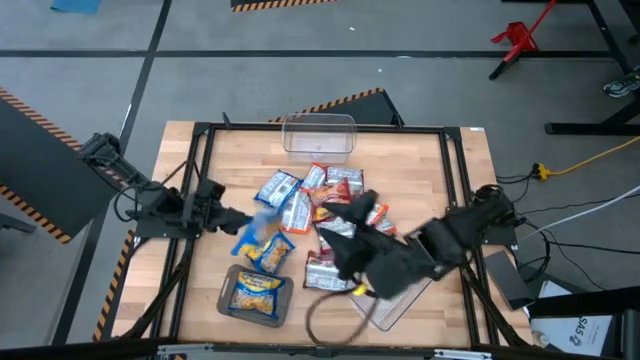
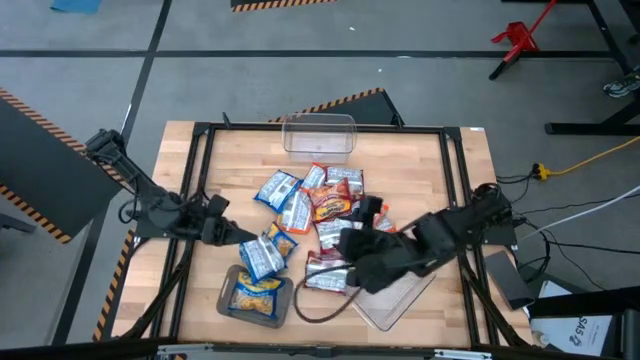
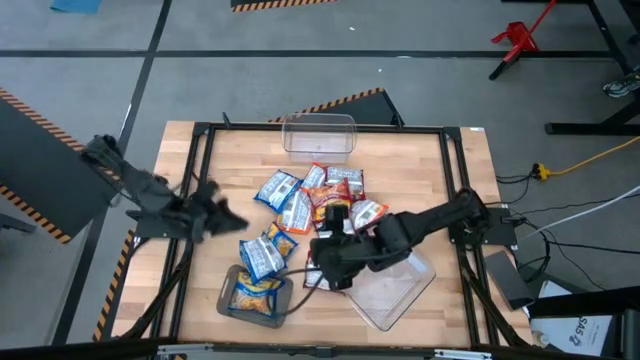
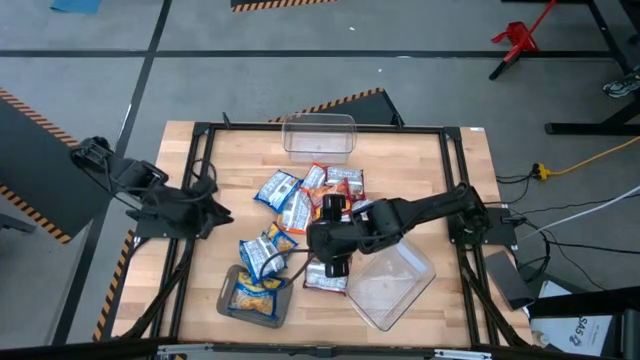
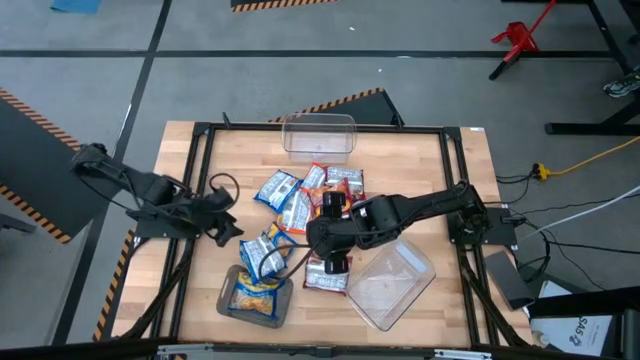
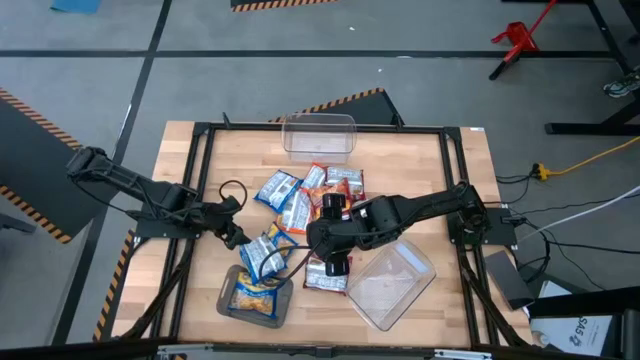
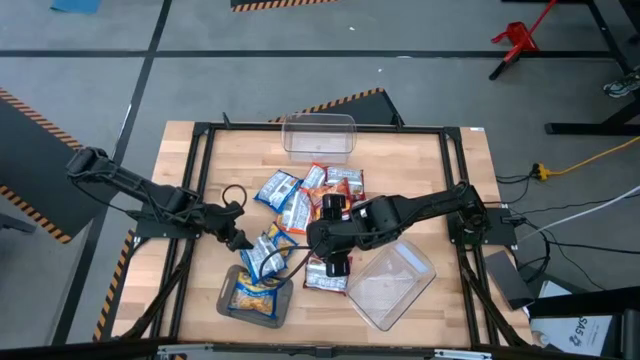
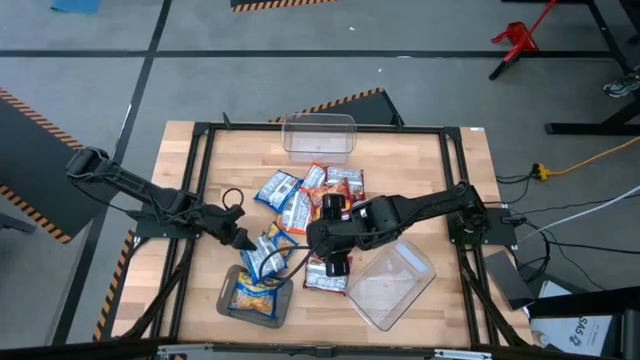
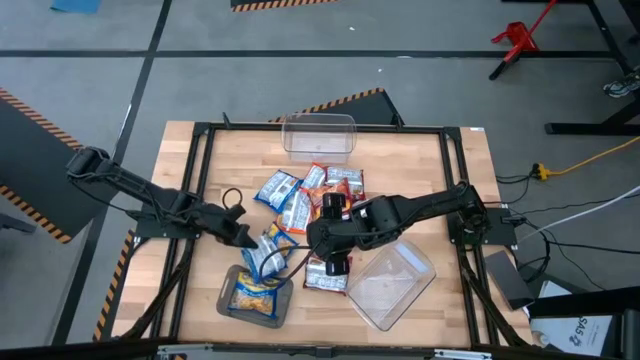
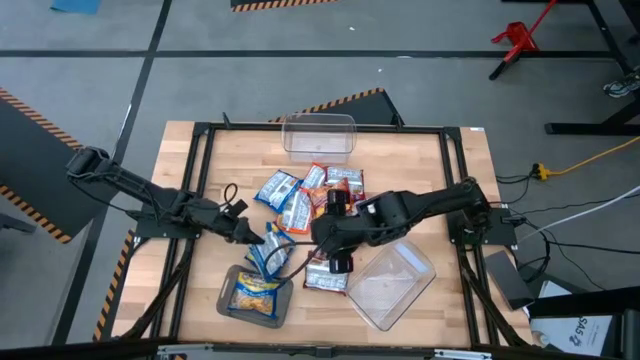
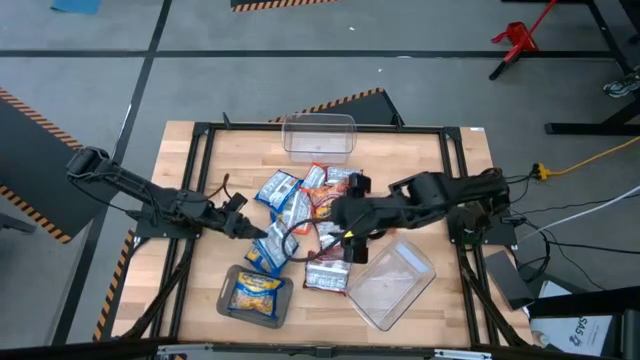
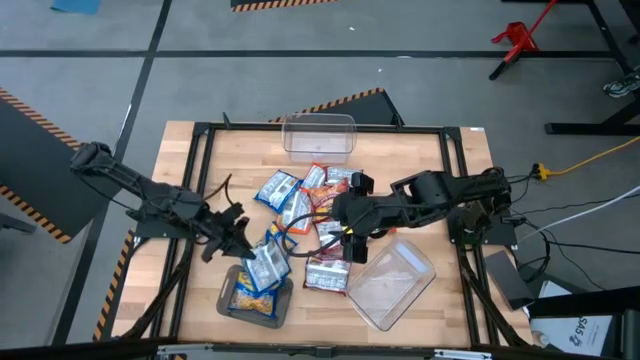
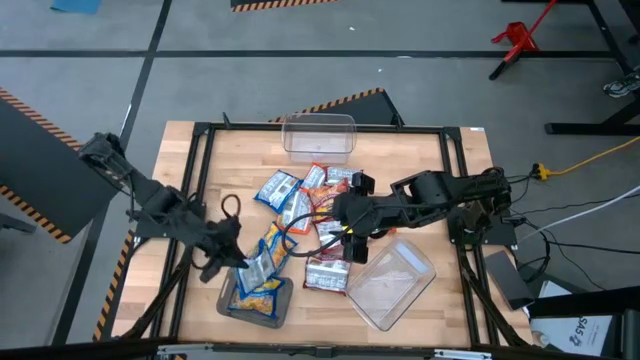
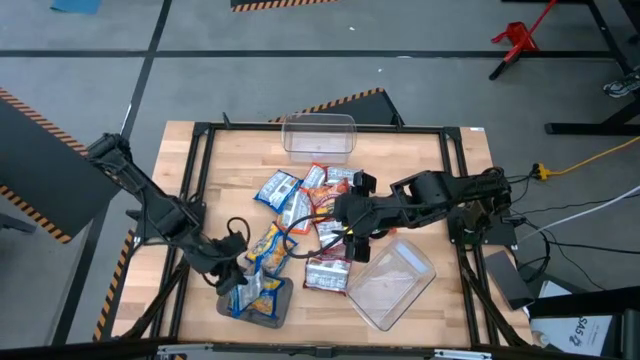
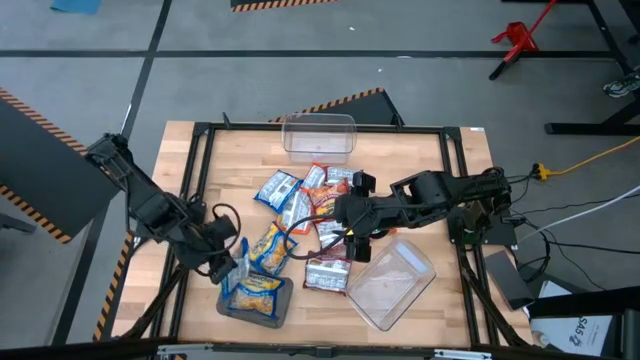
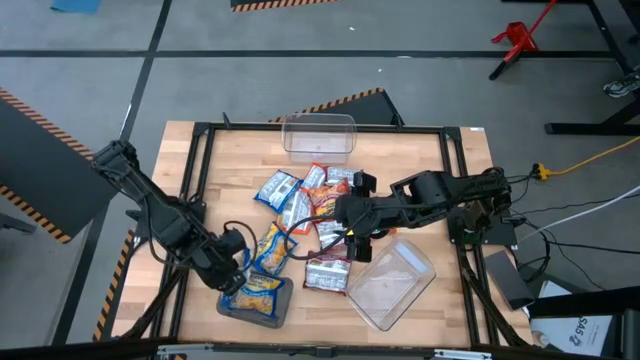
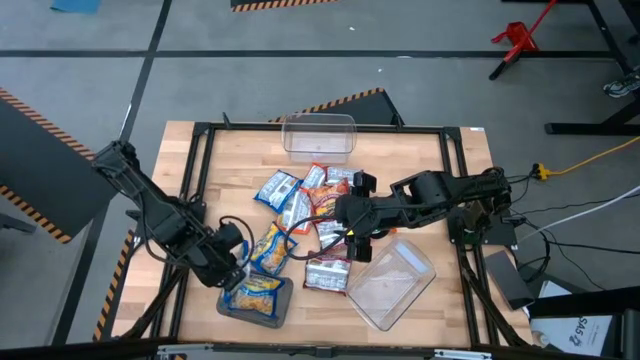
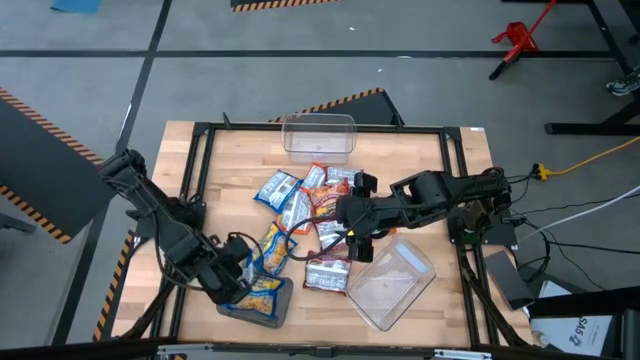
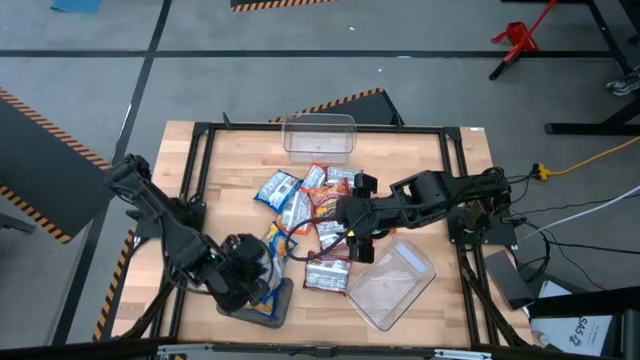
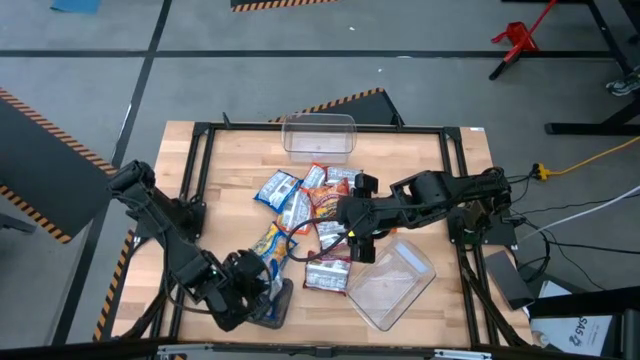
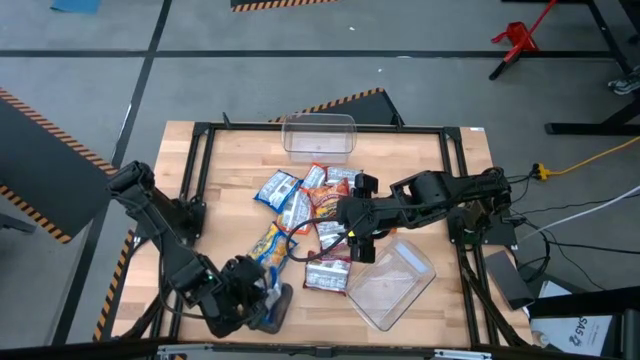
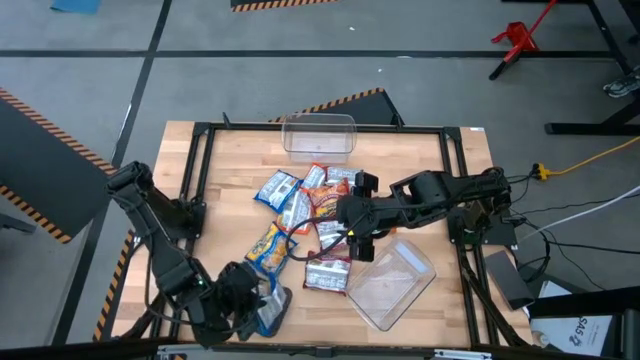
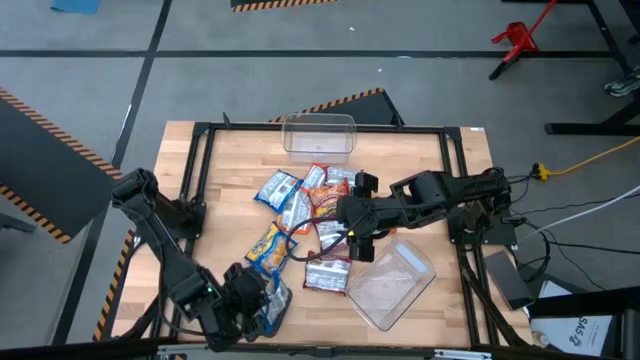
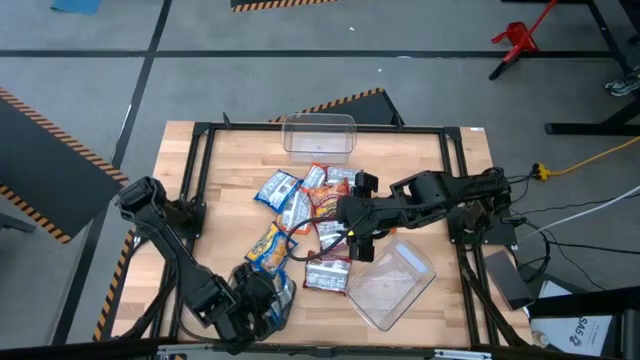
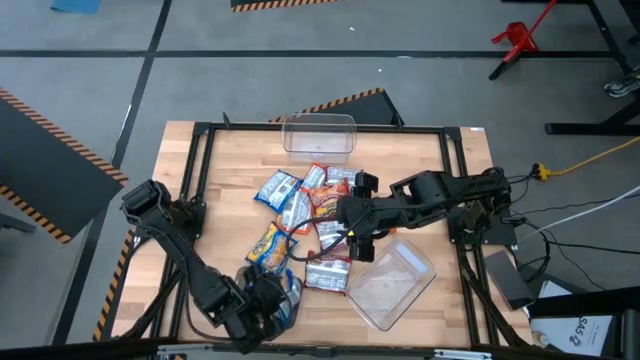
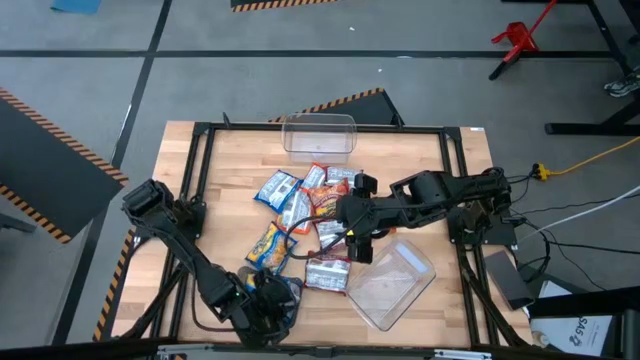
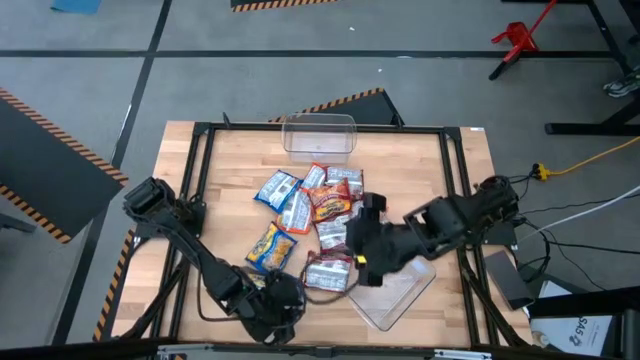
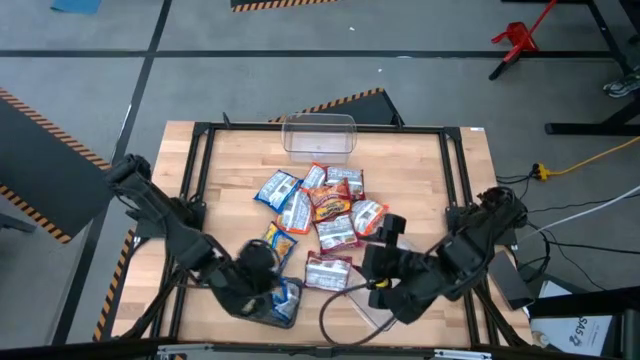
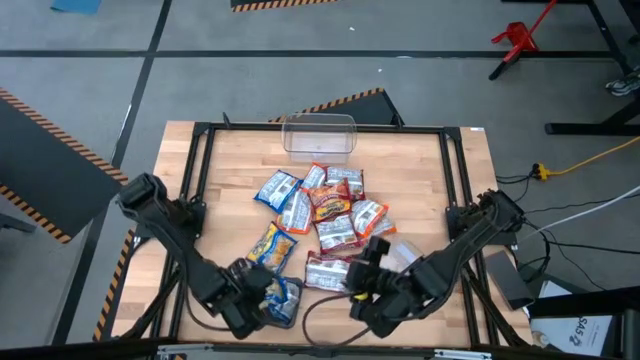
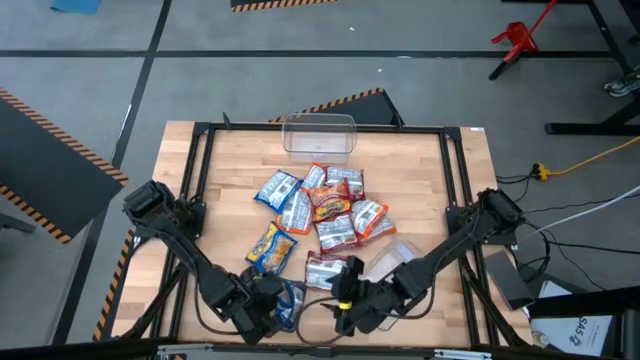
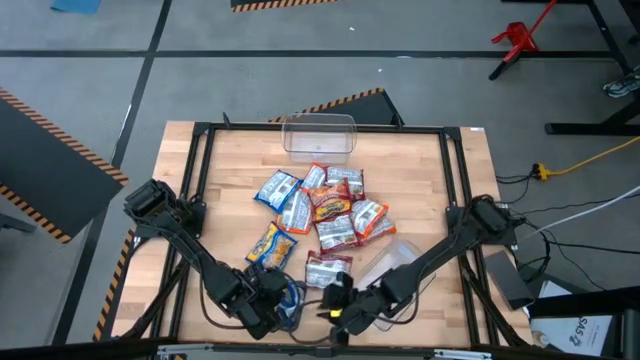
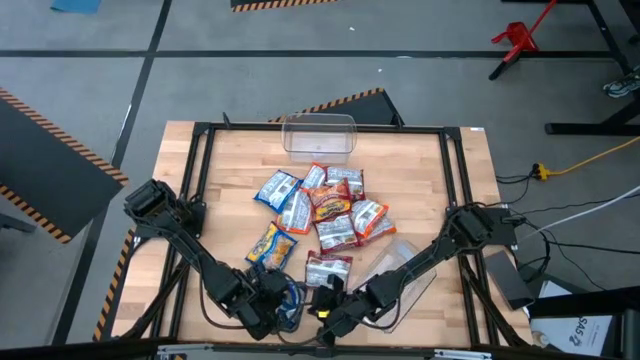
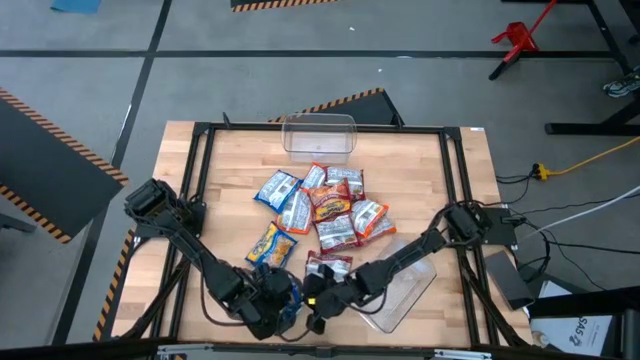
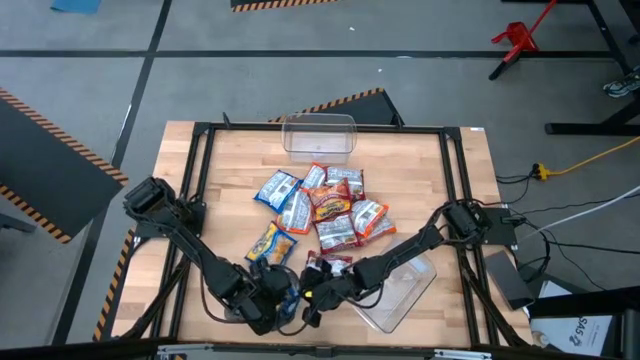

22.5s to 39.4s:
Task: Sort Maruchan noodles
Put the blue noodle pack into the black bin

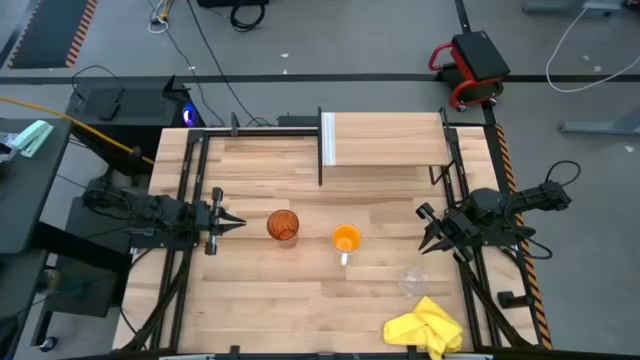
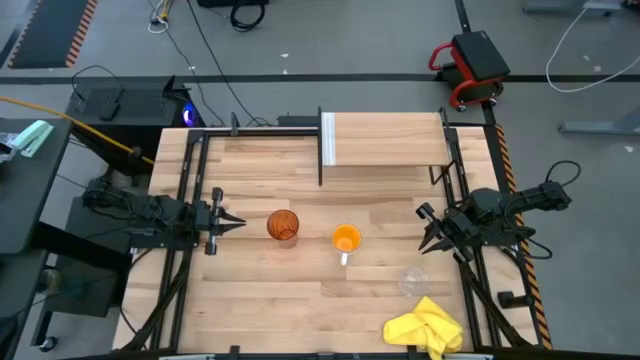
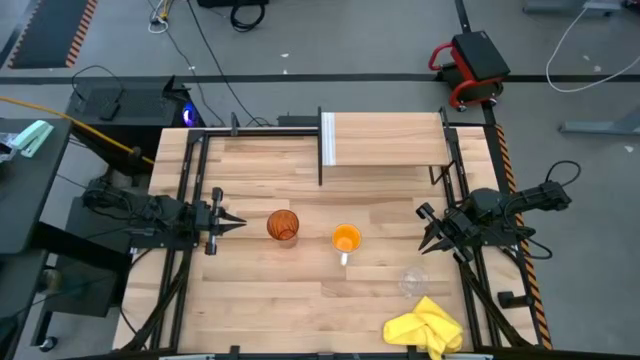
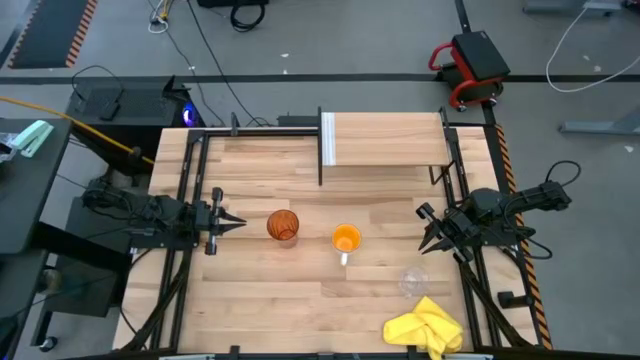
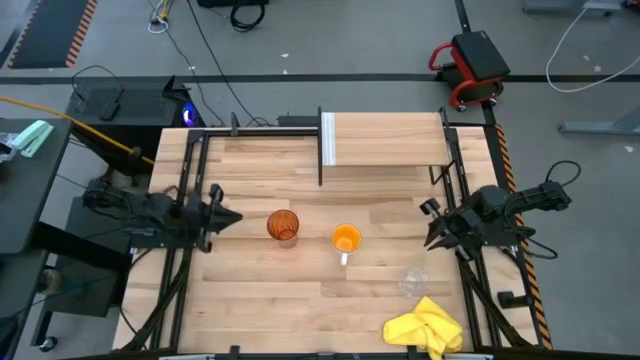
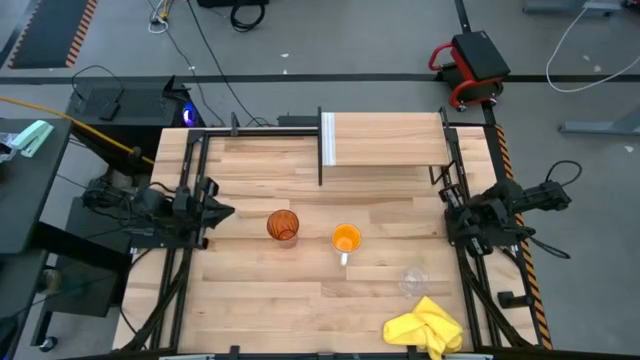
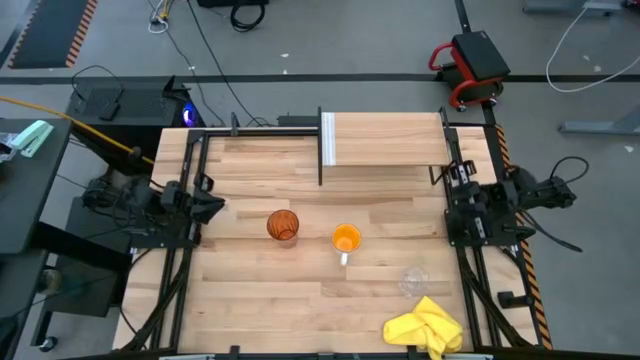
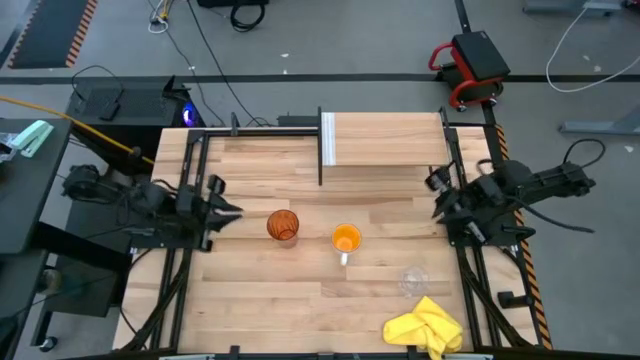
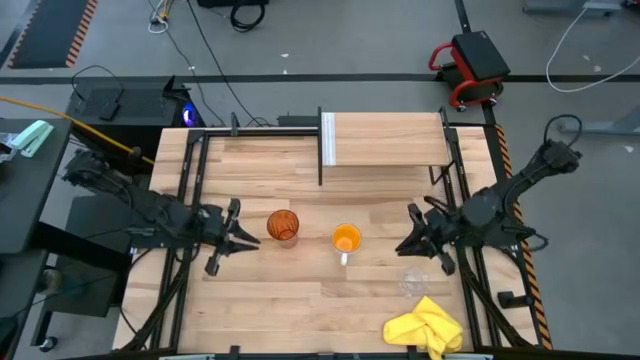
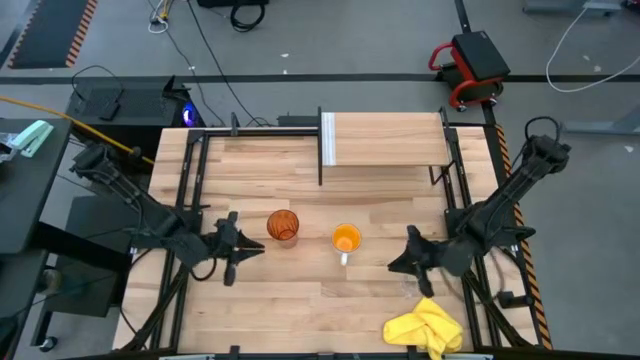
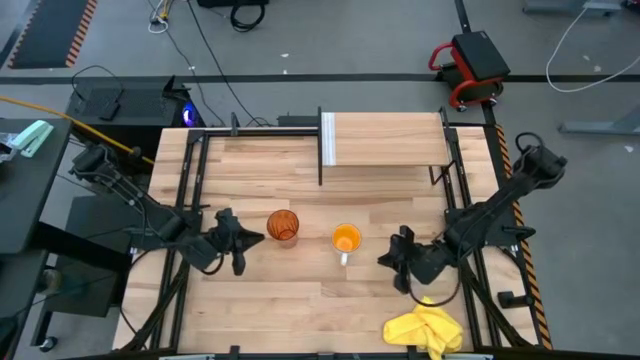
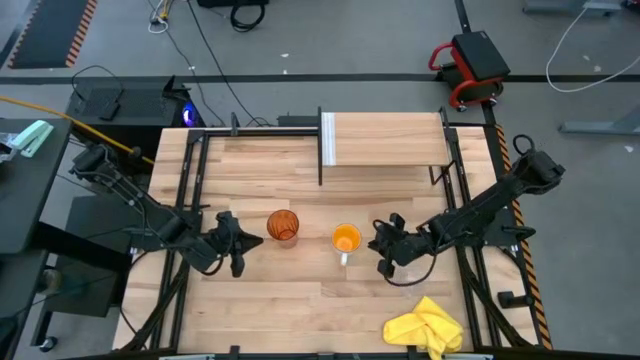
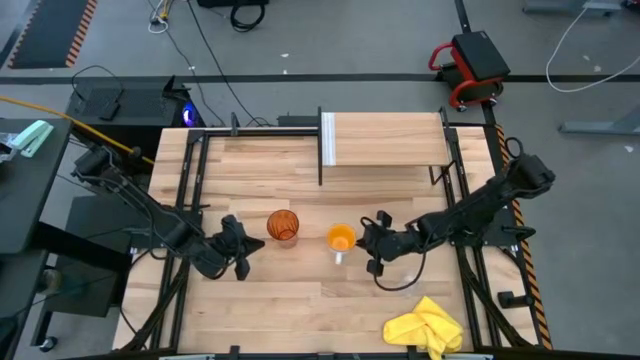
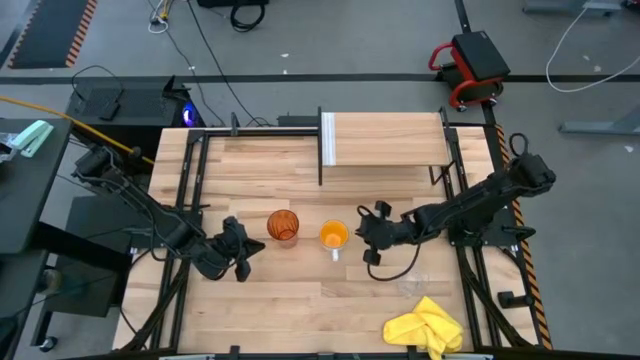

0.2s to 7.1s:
Task: Stack small to large cups/mugs on shelf
Adjust the yellow cup on the table
